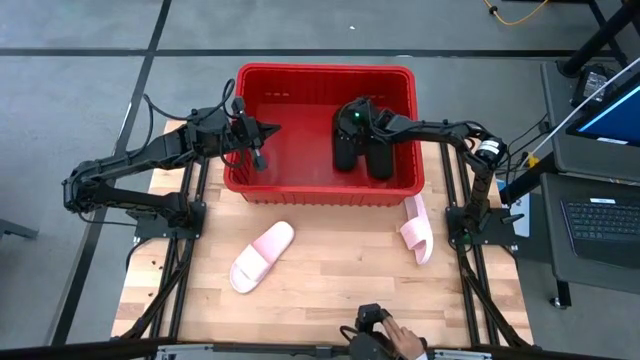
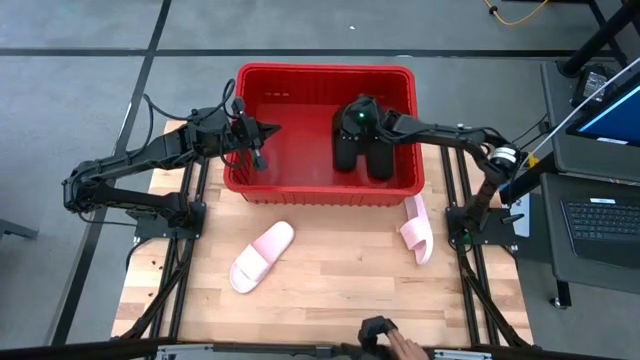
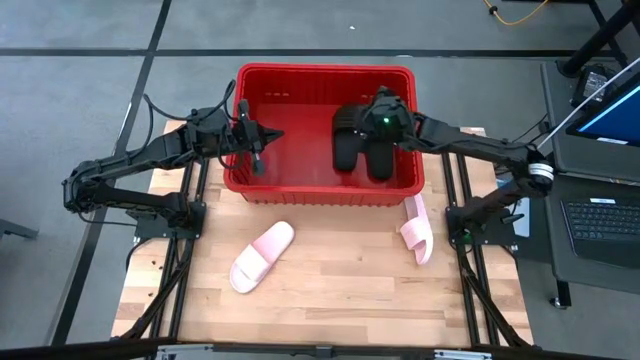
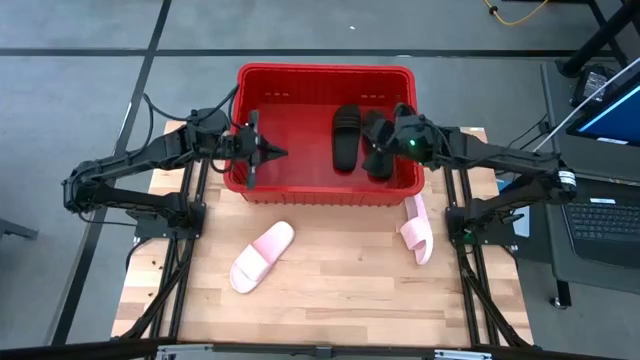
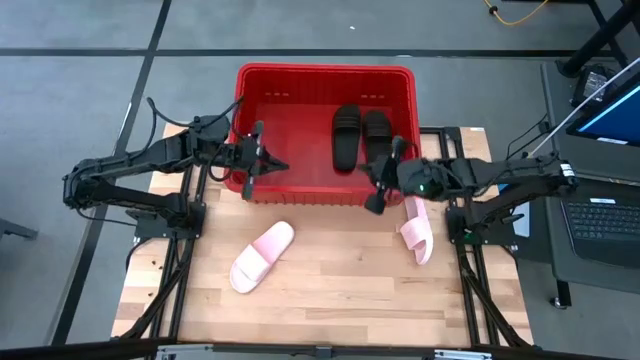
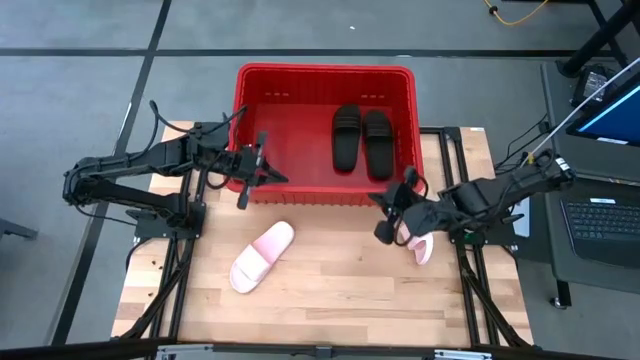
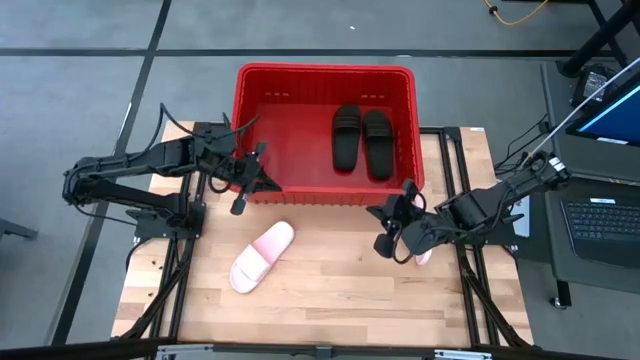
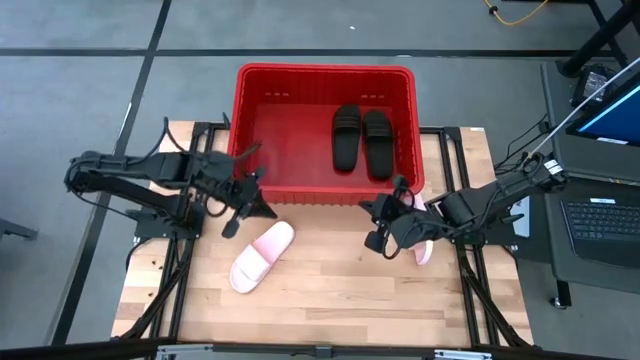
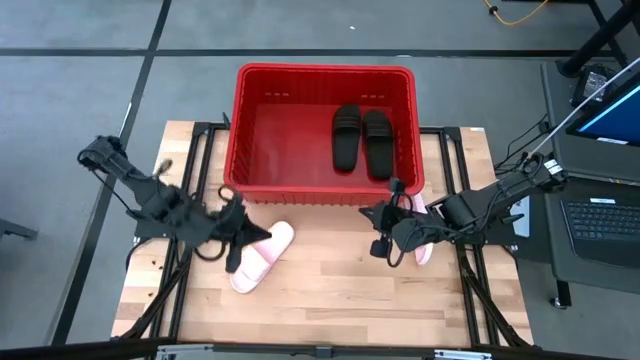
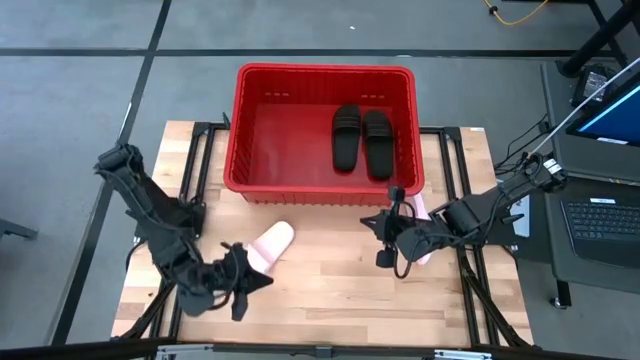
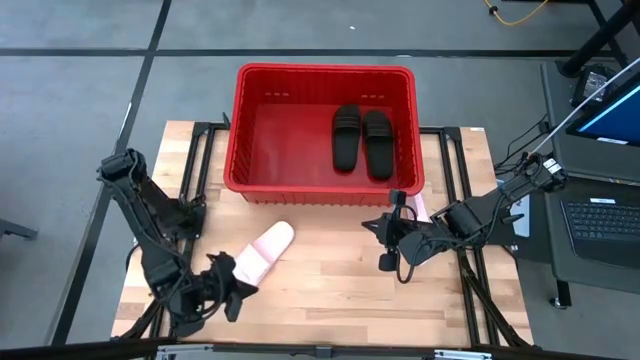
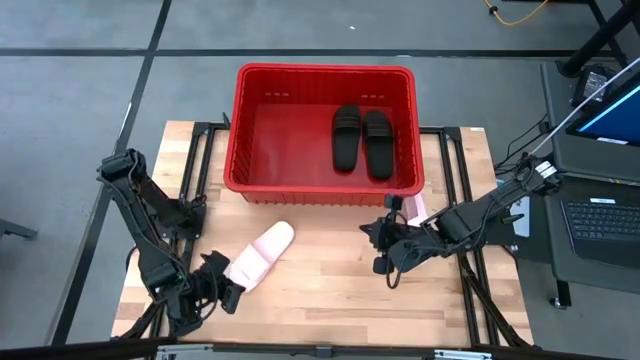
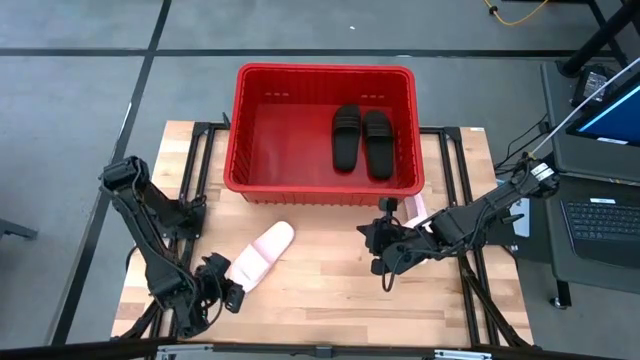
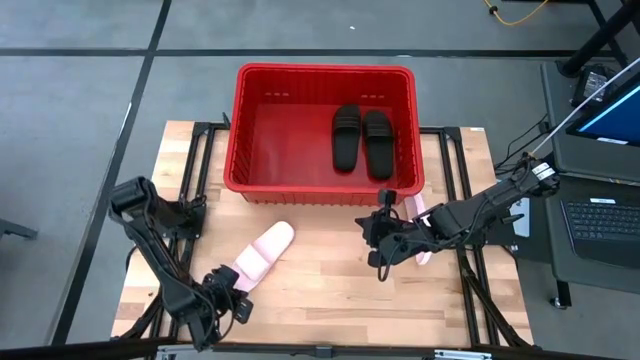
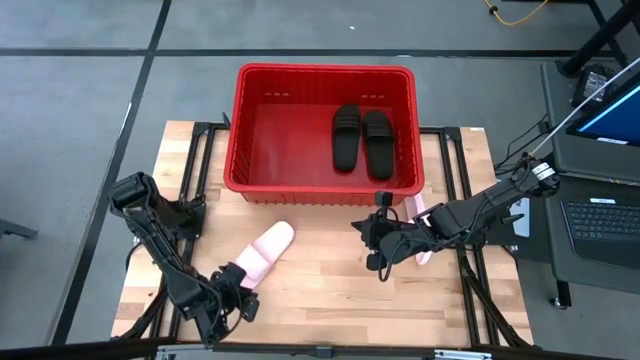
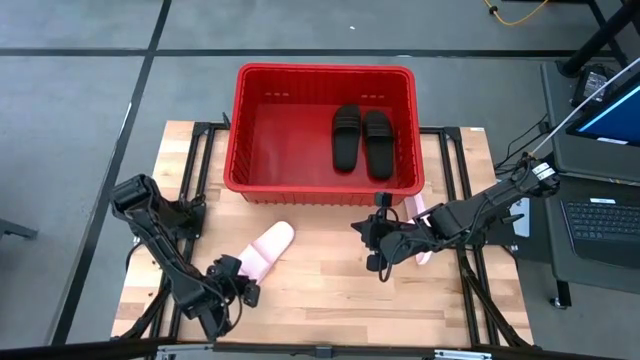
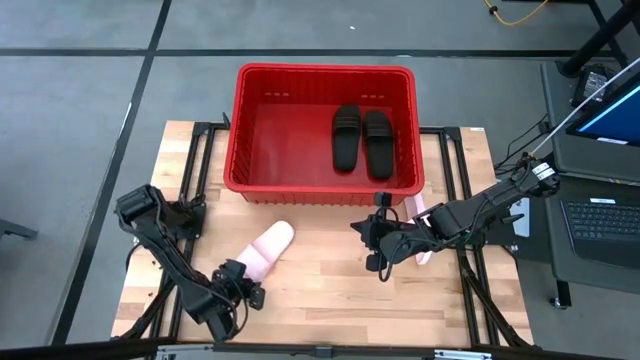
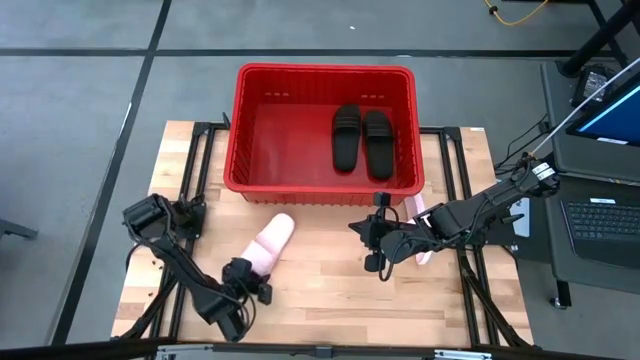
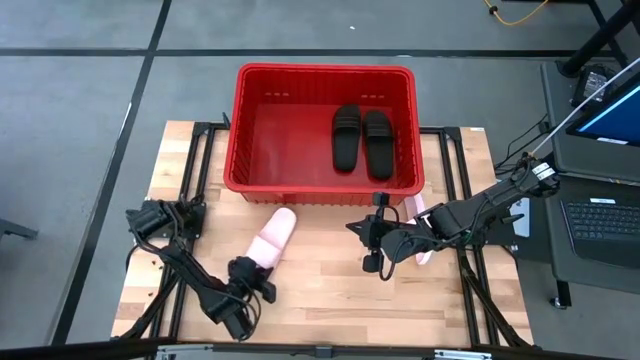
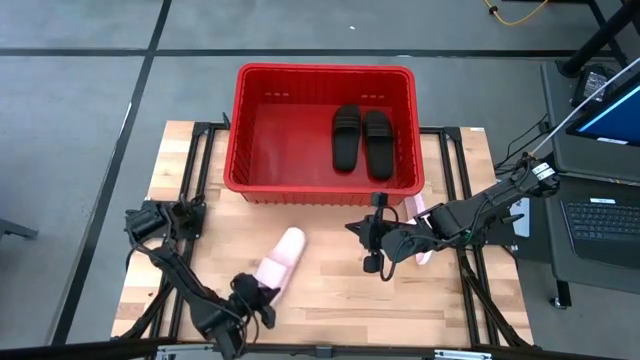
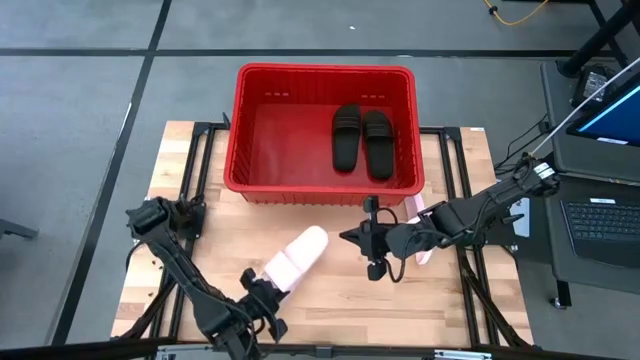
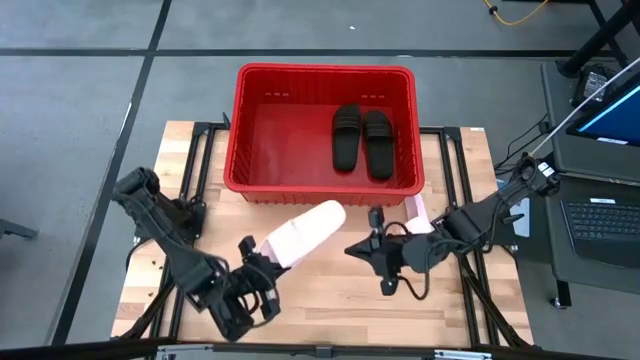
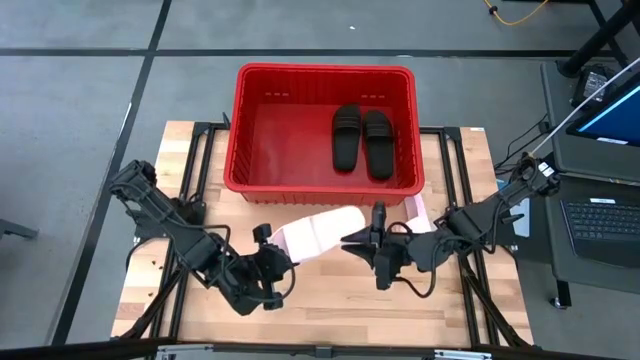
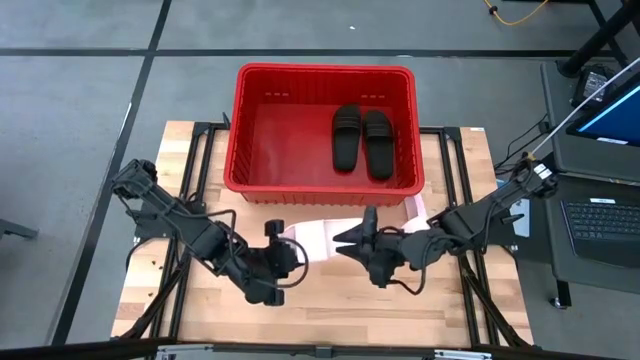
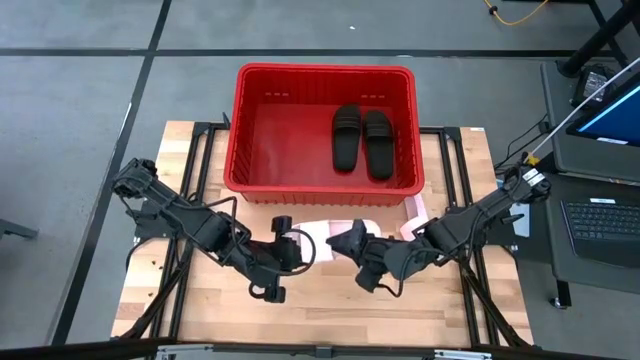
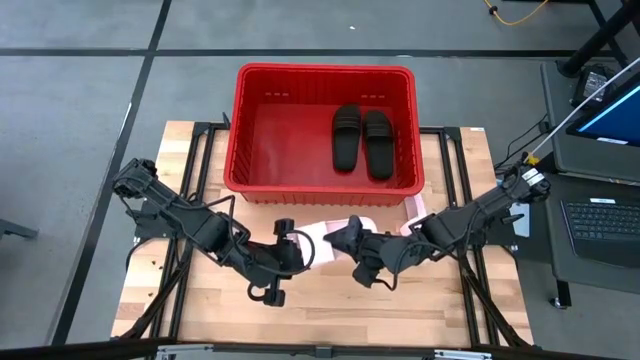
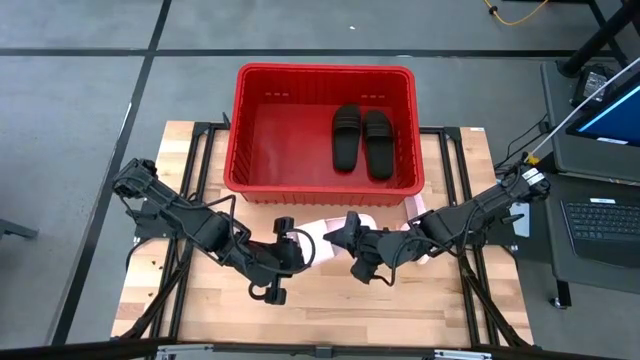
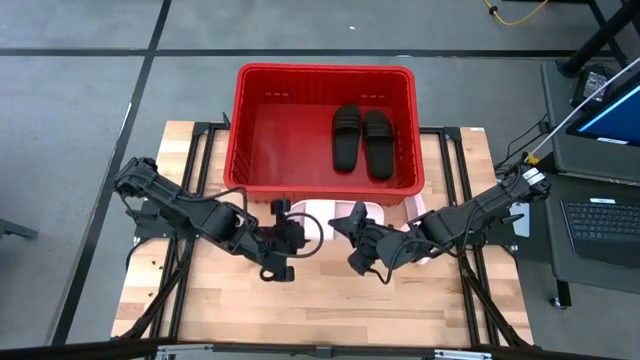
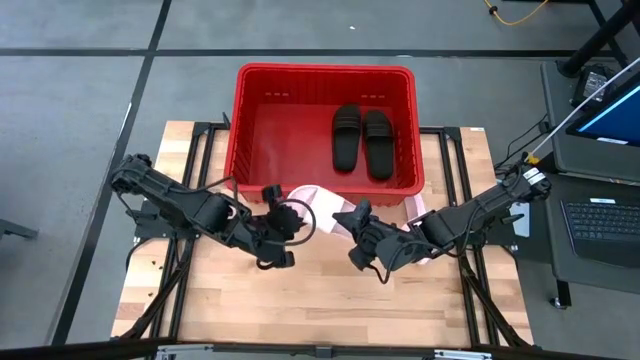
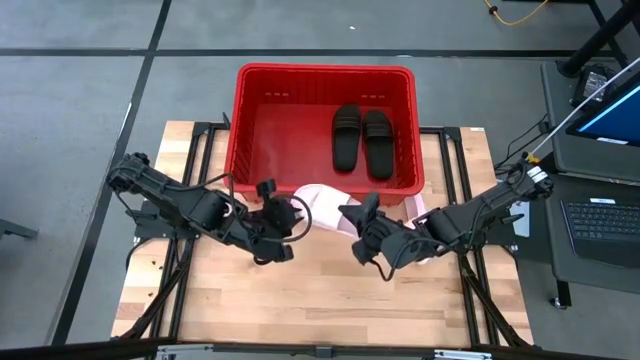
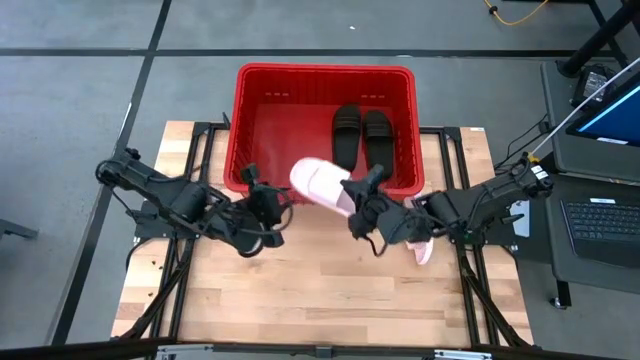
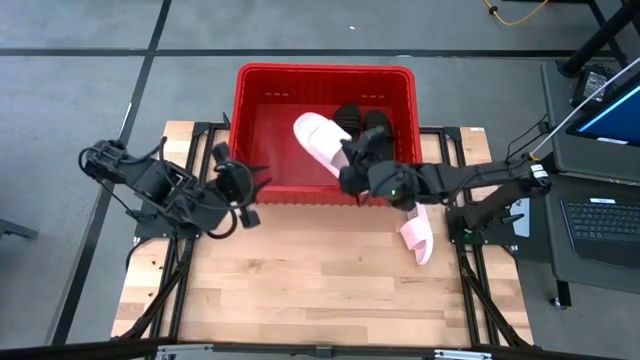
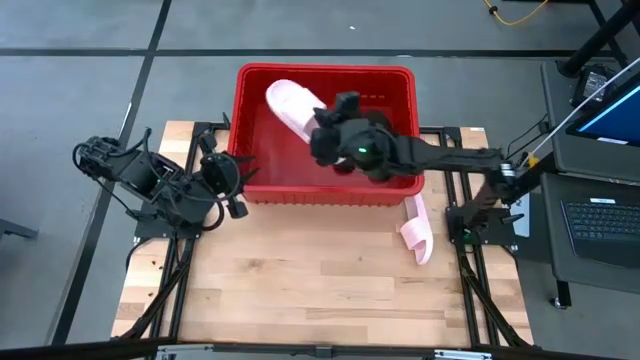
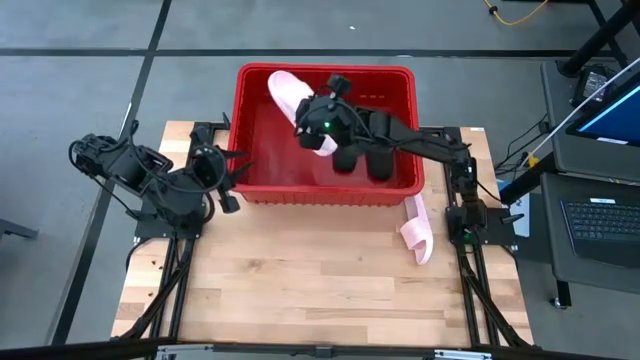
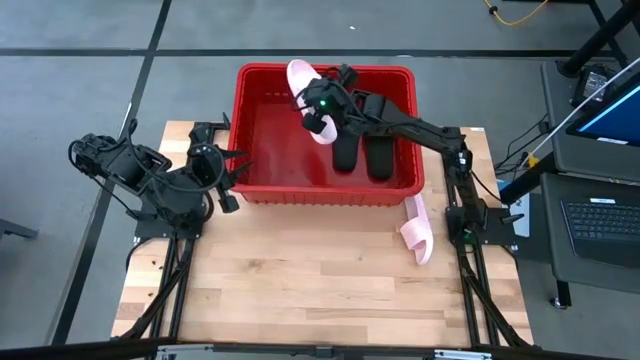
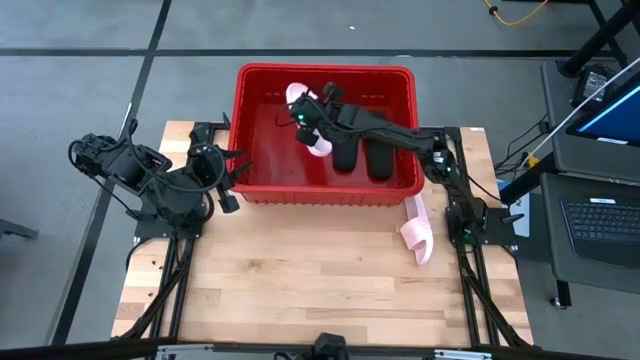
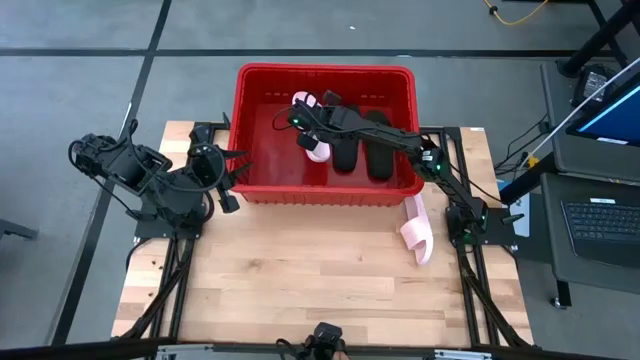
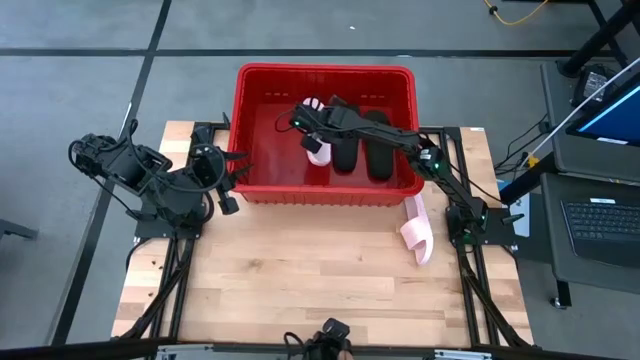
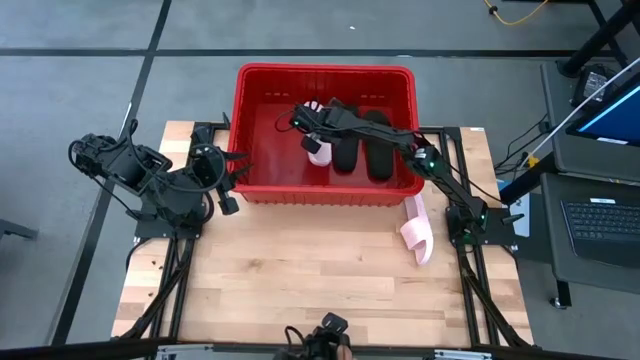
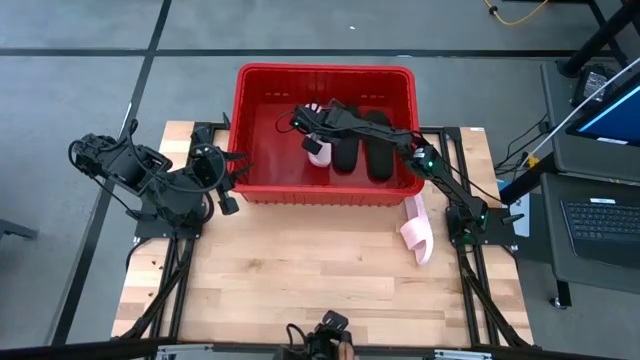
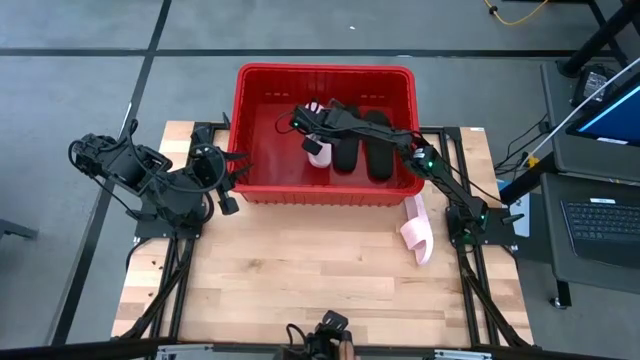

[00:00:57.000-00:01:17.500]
Task: Pick and place slides into bin
Put the left pink slipper into the red bin
